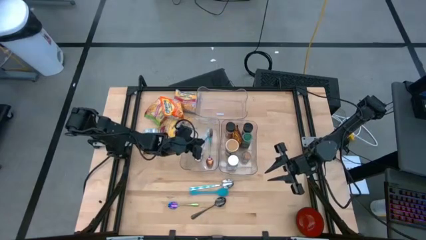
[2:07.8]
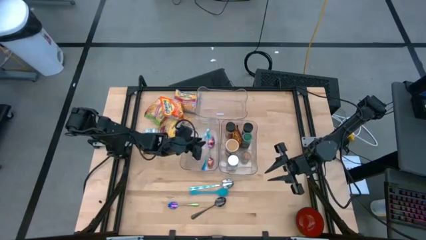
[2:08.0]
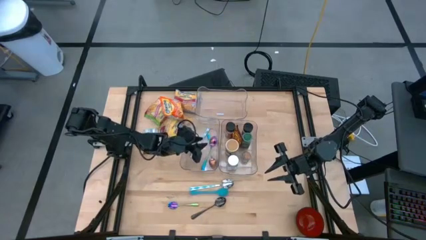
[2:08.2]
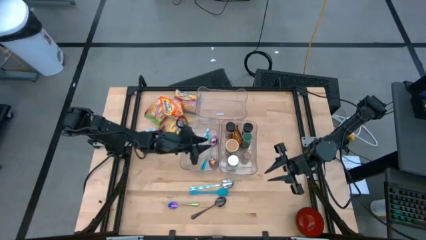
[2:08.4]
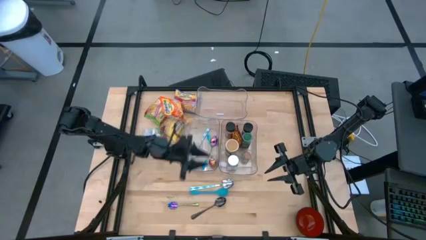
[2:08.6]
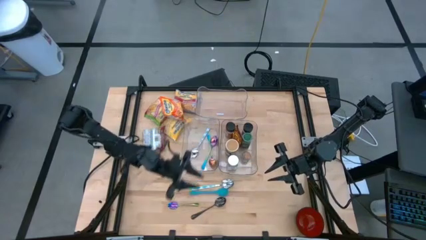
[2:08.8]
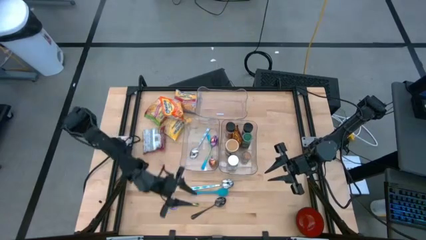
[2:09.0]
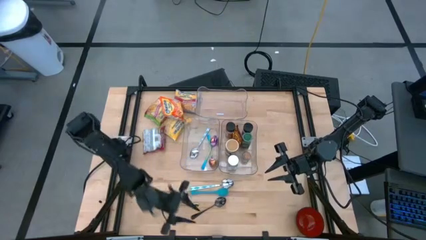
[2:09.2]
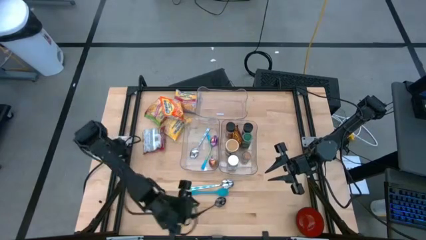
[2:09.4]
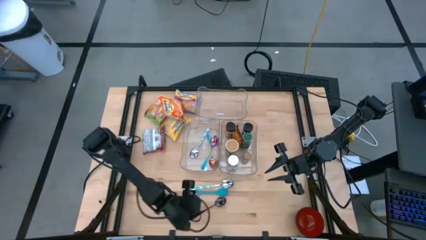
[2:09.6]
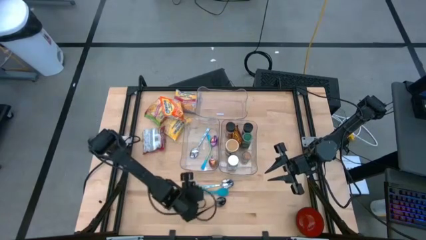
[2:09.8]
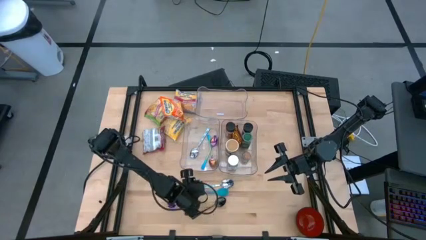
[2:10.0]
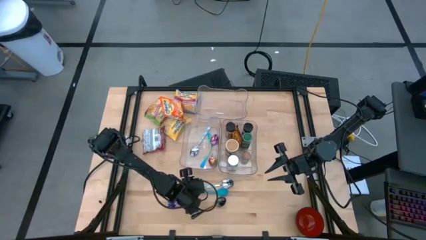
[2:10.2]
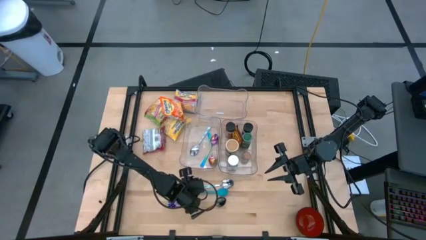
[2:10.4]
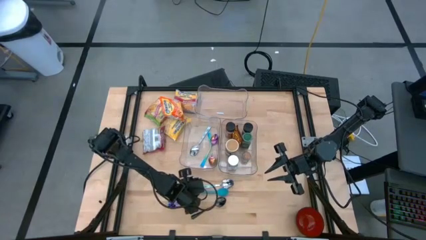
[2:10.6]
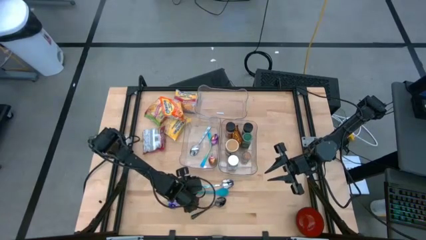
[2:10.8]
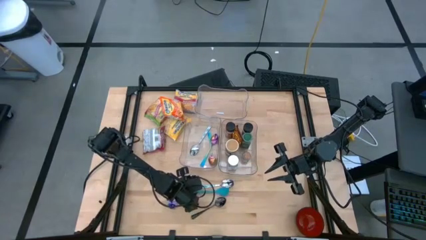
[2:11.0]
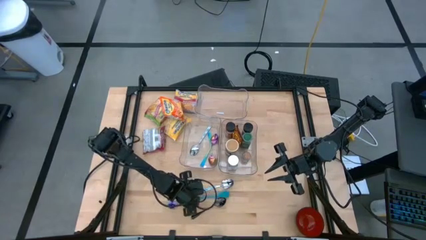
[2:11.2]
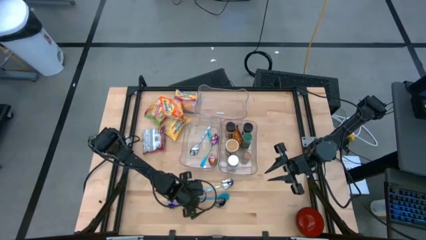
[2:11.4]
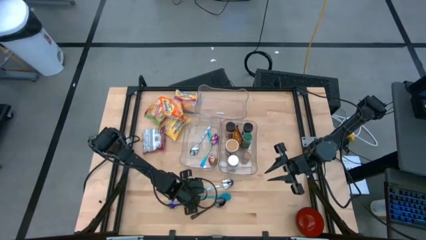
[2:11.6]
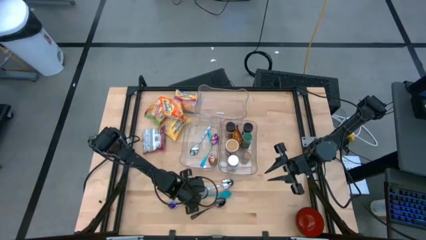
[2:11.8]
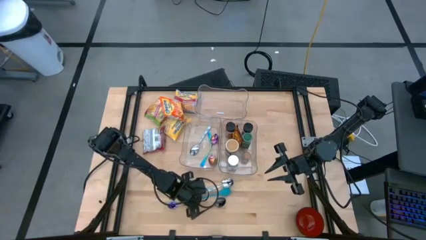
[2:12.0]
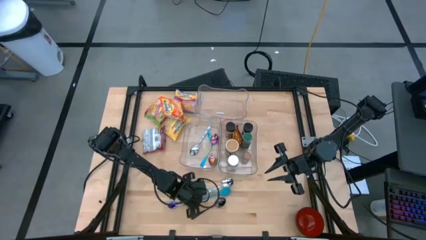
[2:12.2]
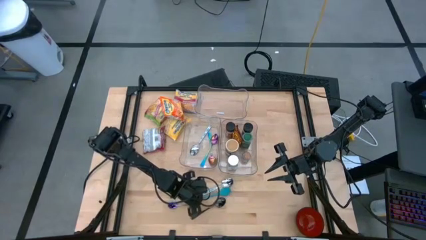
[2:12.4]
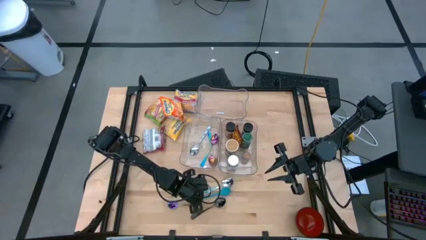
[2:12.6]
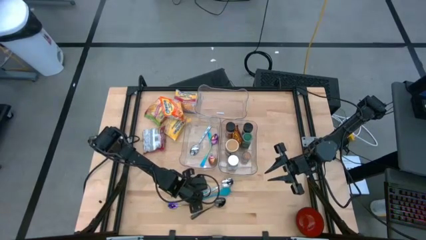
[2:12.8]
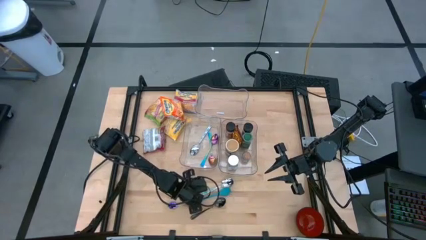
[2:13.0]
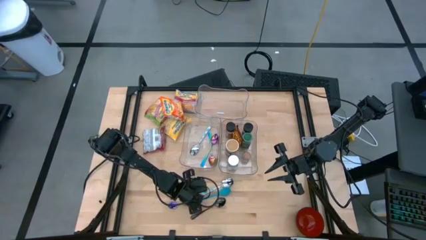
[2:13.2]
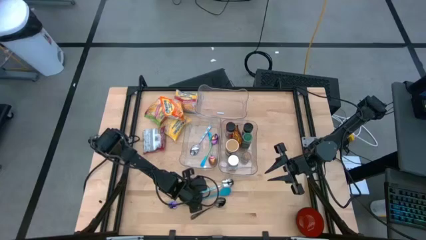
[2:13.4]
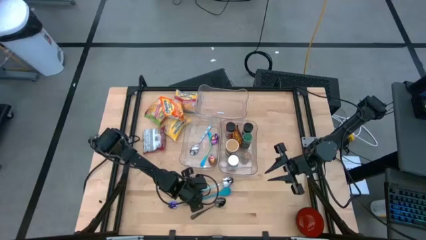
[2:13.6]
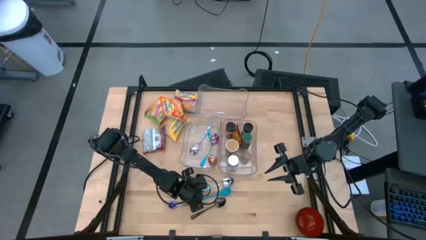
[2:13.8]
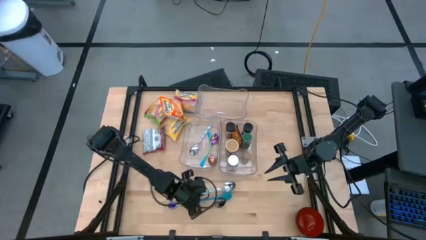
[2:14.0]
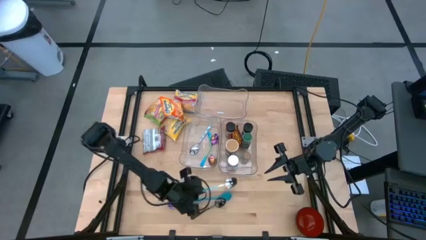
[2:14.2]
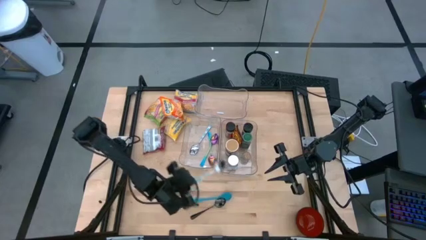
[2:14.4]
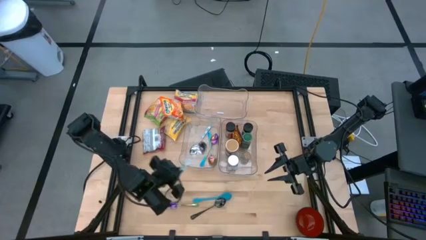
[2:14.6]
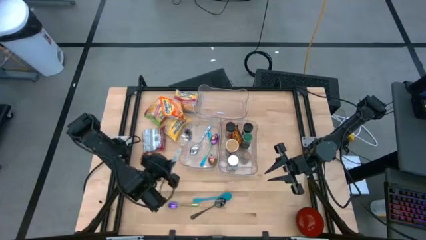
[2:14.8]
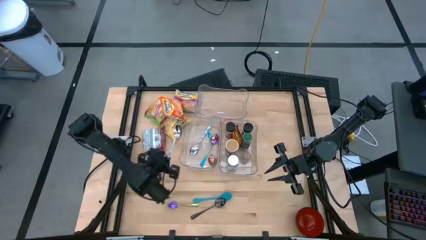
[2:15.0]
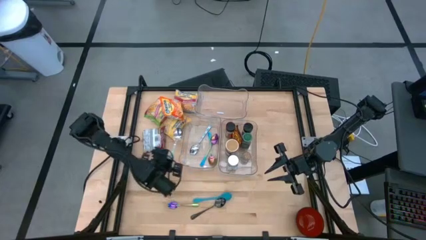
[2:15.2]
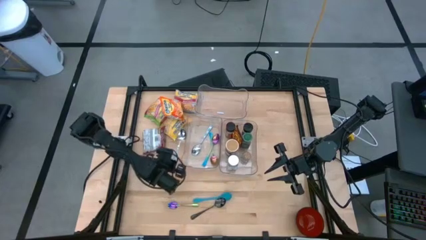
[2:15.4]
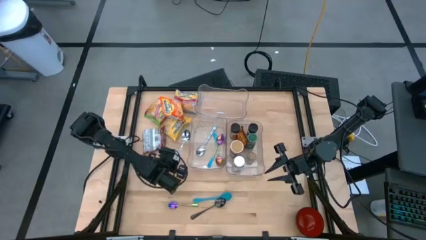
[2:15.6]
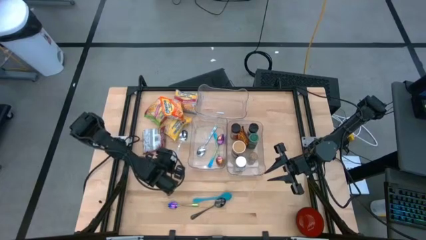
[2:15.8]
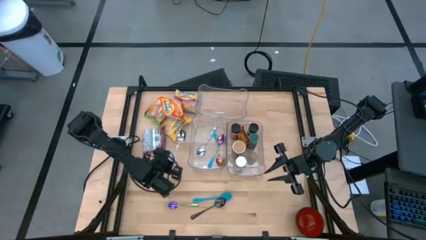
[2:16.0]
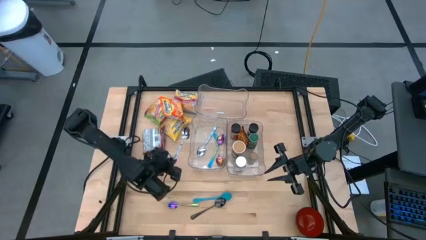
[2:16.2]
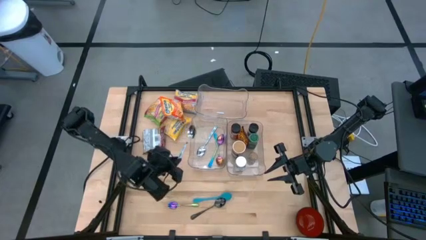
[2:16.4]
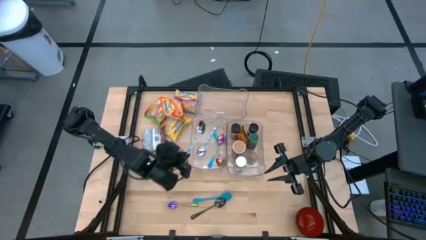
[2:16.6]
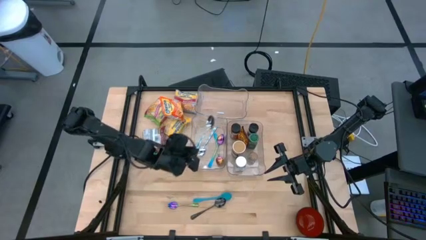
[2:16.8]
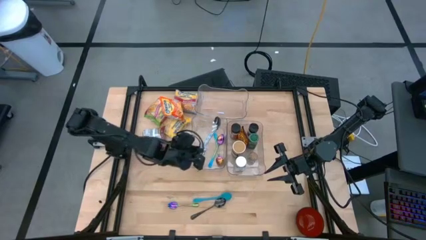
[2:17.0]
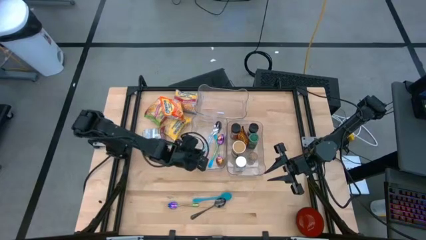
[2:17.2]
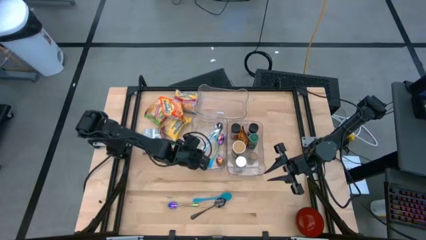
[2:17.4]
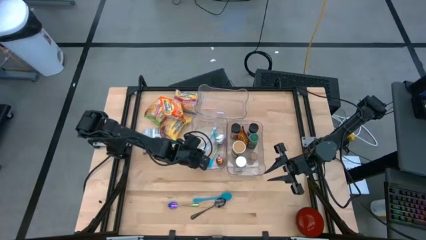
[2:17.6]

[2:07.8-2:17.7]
Task: Pick & Place Food Item
Put the blue patterned spoon into the bottom left transparent bin

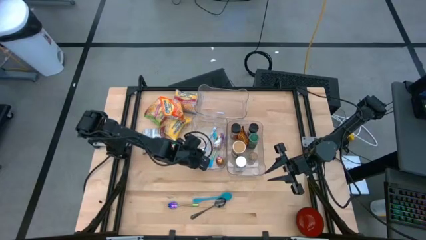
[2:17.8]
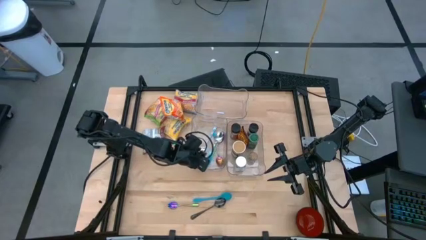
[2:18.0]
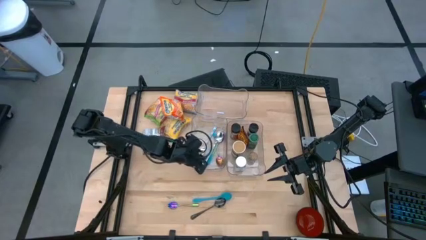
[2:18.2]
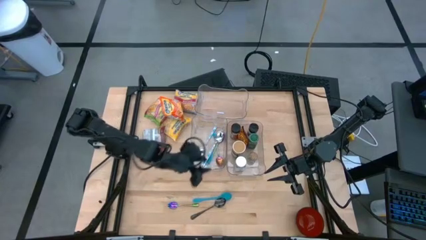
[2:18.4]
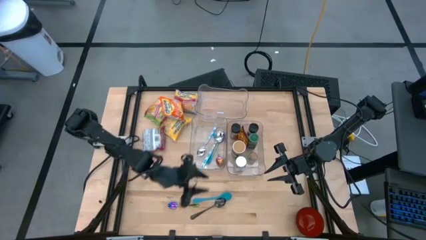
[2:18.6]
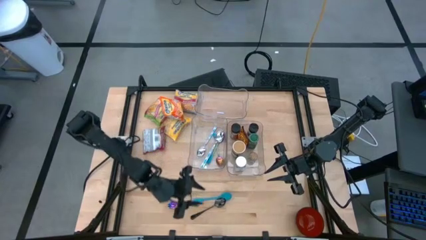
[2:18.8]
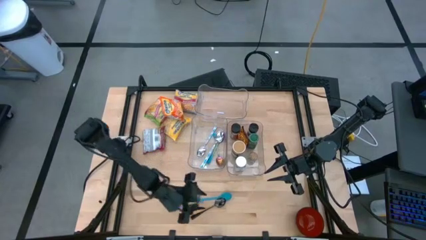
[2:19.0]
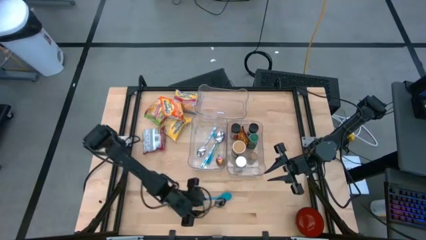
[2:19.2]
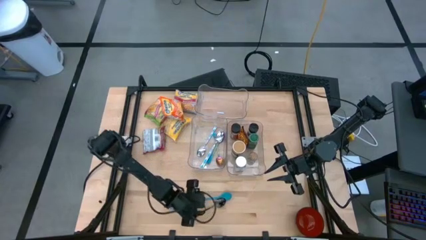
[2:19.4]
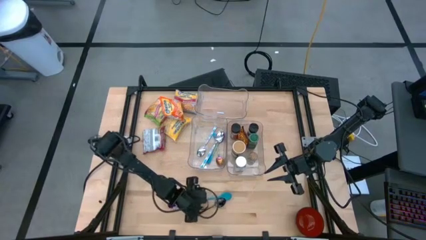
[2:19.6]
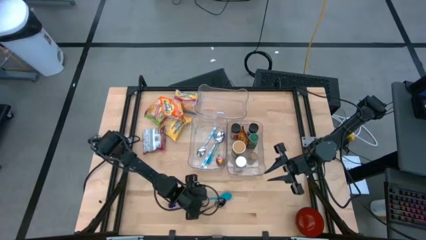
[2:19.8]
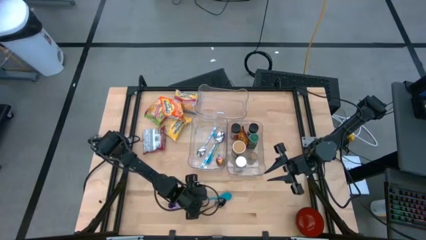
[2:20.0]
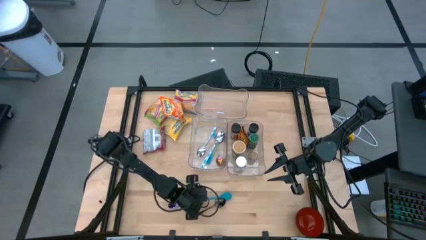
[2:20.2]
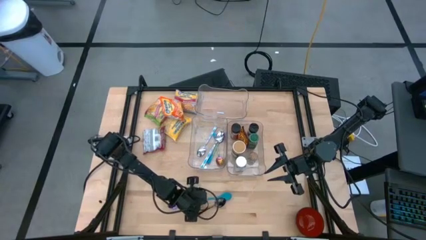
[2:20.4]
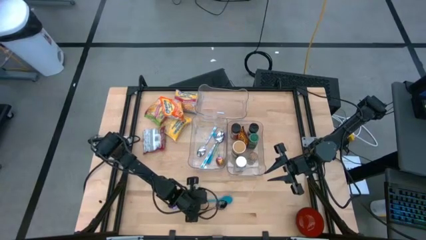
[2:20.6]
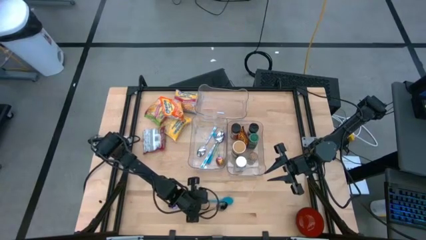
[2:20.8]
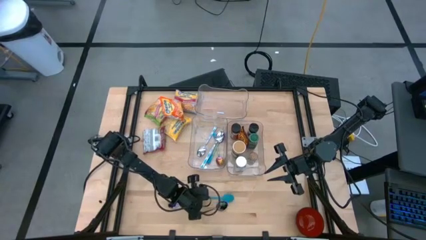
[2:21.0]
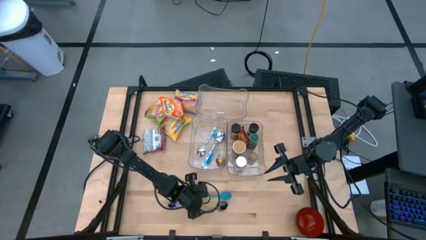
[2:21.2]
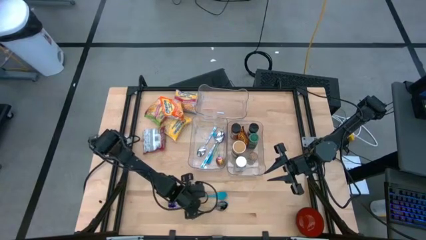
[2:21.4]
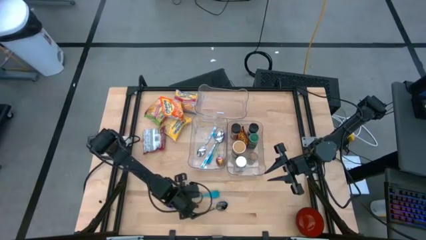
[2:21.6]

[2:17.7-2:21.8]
Put the blue spoon into the bottom left transparent bin

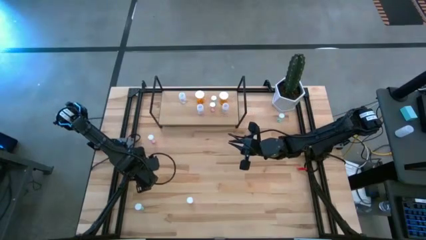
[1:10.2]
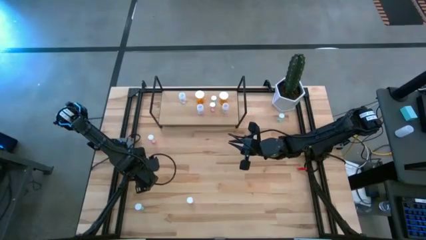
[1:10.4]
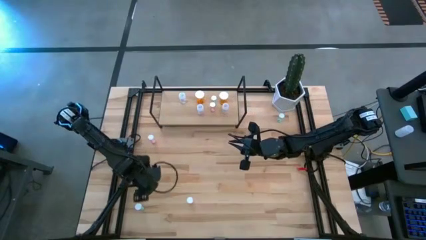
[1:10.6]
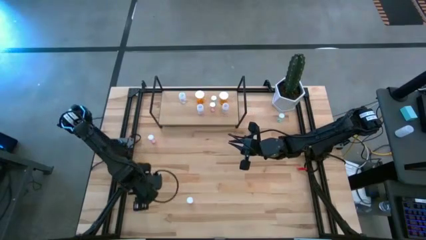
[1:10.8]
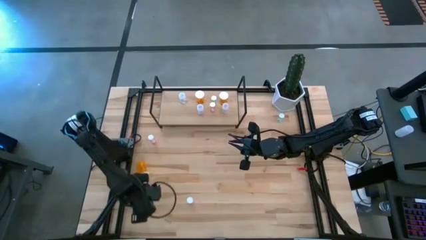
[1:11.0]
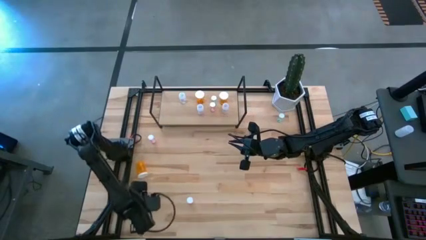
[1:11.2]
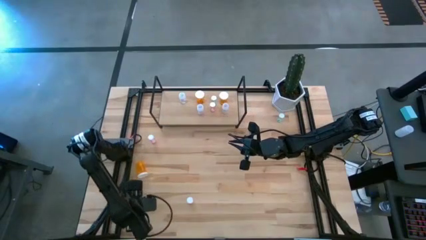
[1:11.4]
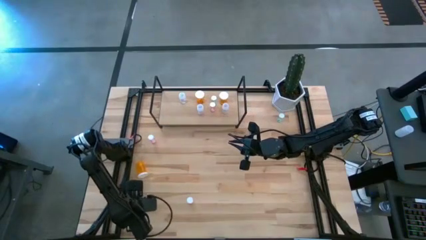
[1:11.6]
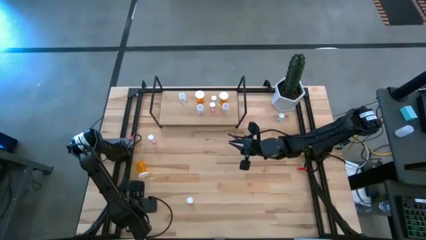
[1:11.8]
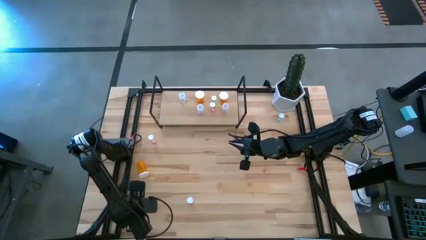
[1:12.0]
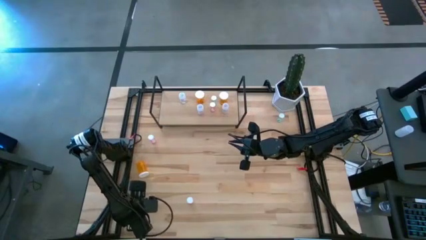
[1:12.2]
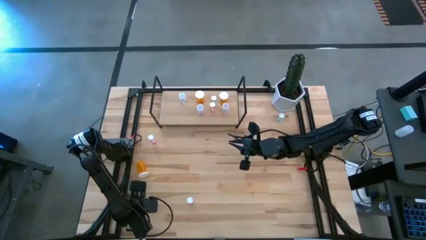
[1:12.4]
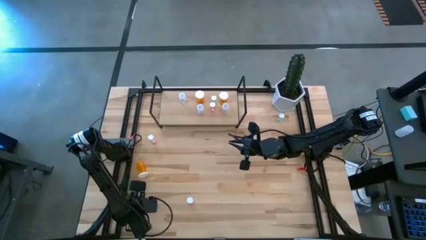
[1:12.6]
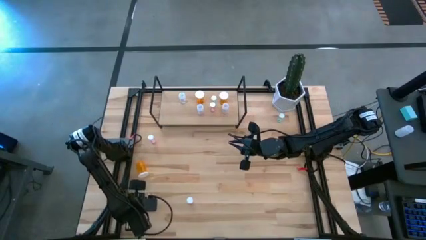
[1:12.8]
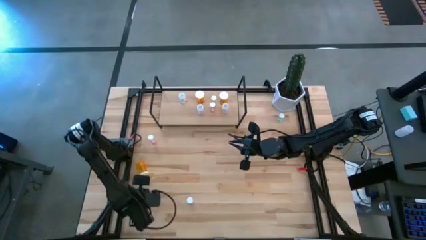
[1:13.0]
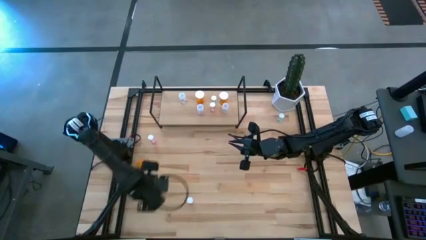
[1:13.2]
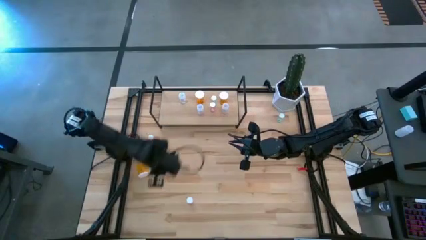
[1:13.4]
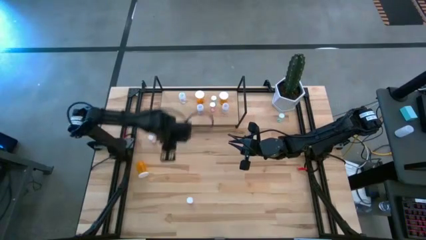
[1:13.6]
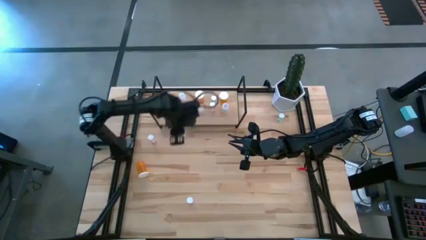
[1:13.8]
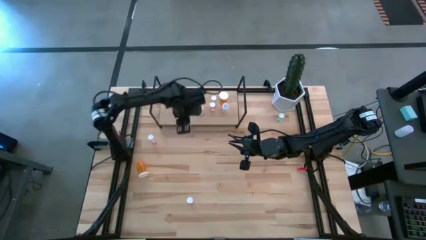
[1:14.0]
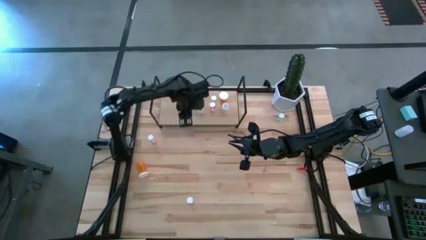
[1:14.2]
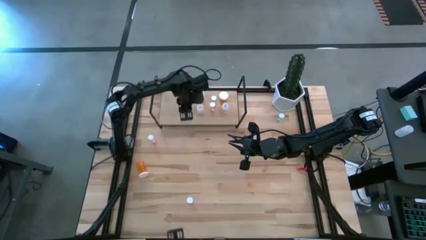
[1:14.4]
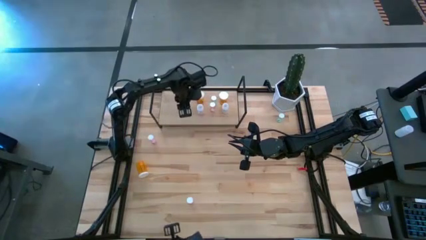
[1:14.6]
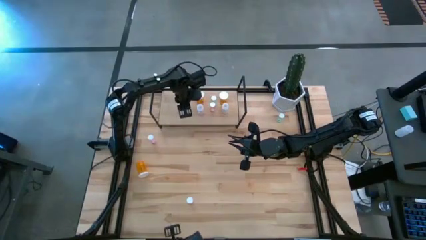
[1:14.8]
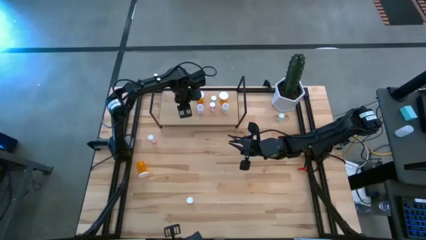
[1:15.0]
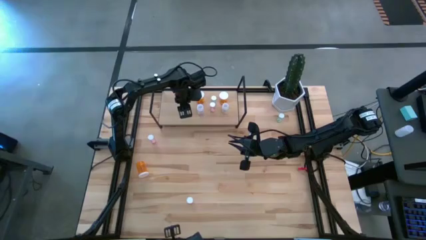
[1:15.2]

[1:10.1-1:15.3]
Task: Pick and place medicine bottles onto shelf by color
Put the bottom green pill bottle on the shelf
